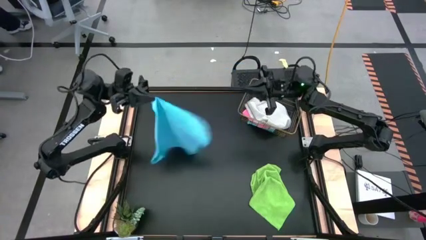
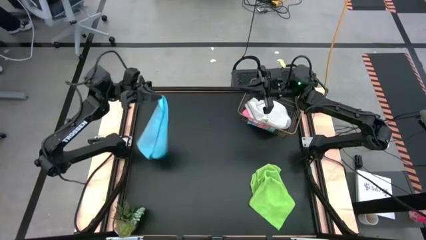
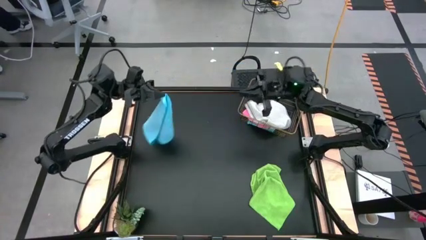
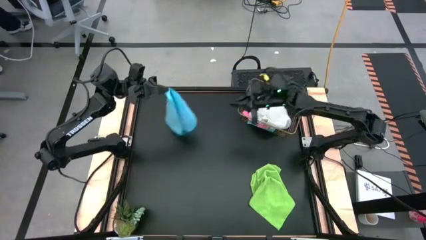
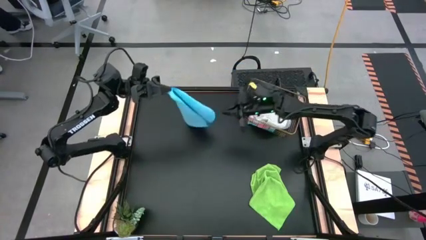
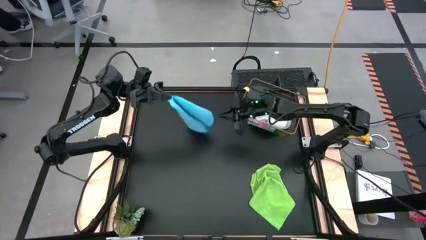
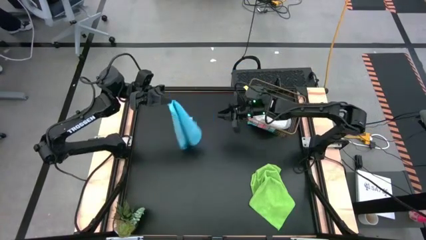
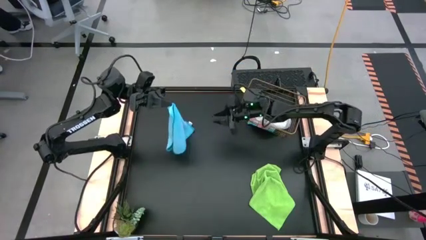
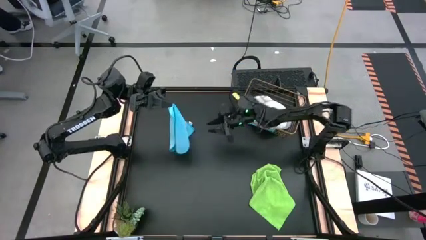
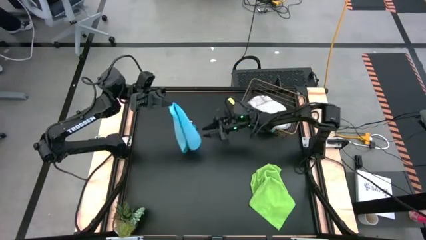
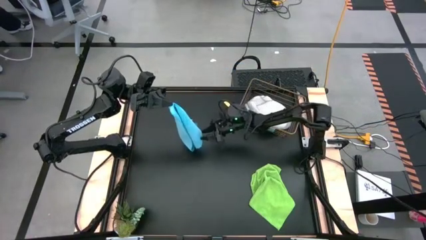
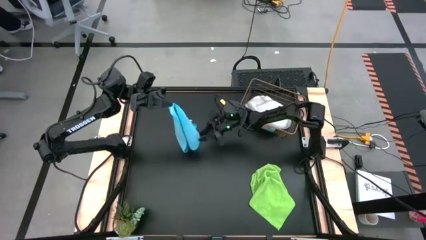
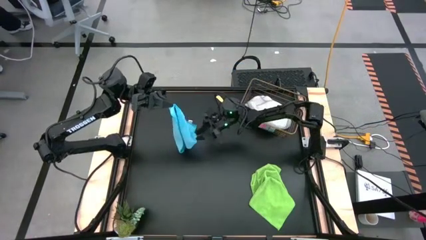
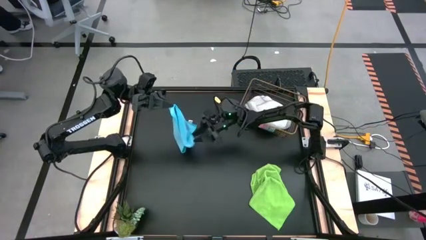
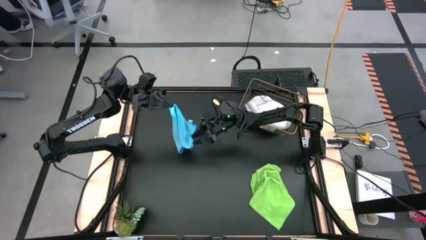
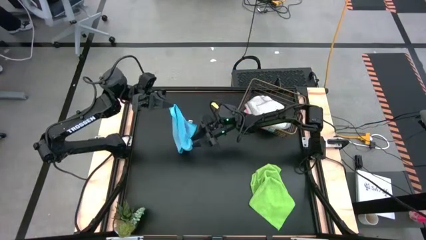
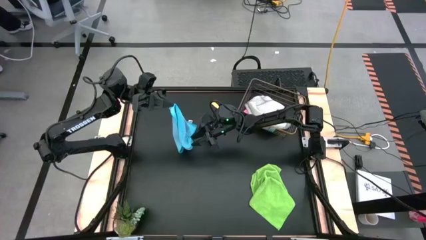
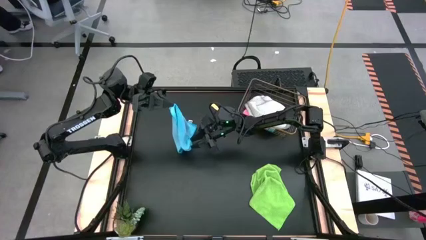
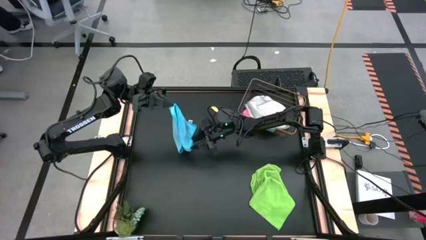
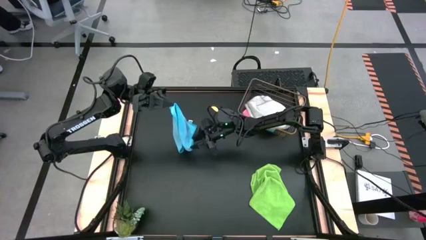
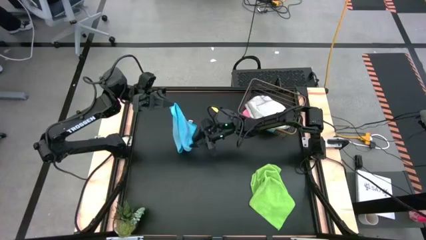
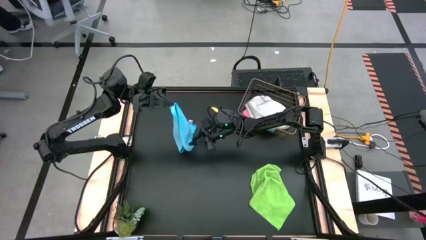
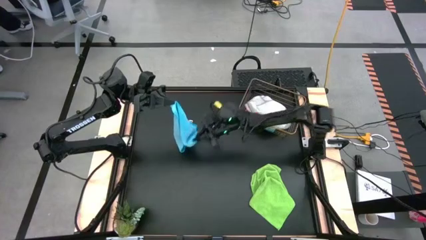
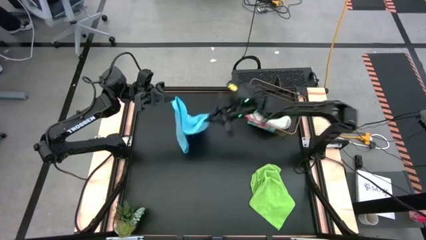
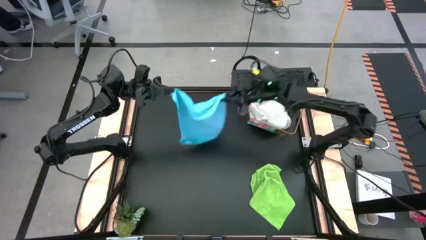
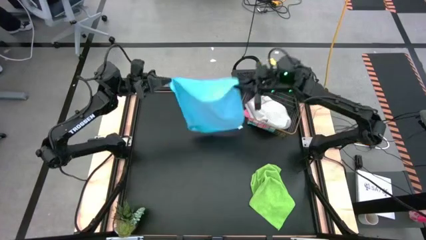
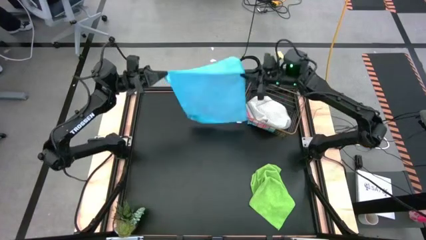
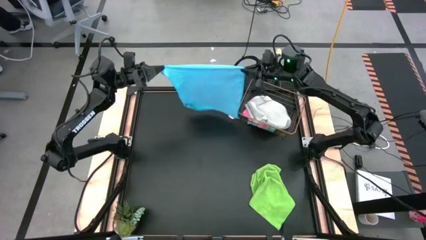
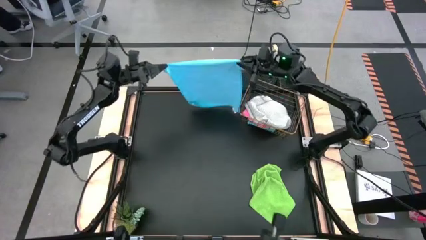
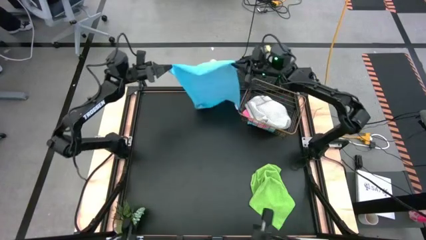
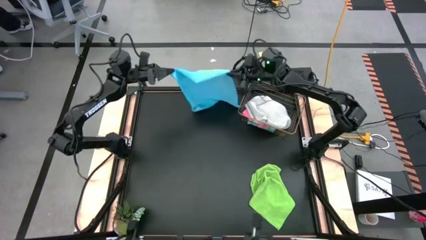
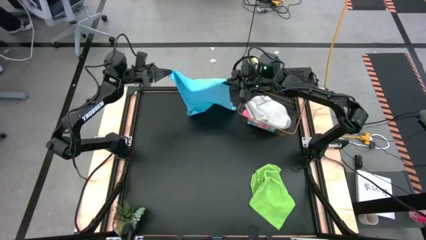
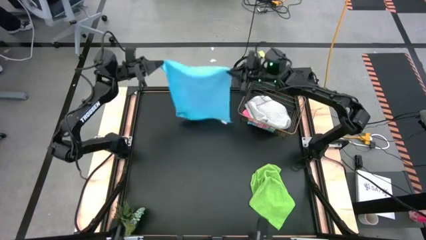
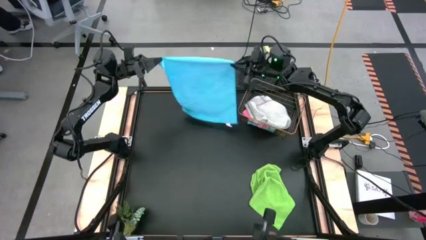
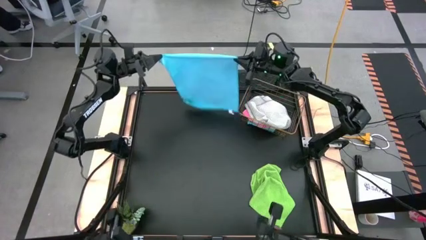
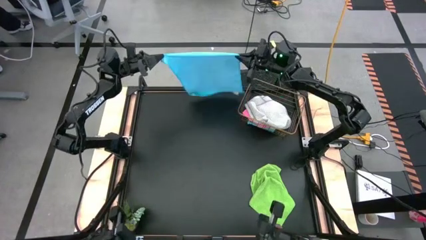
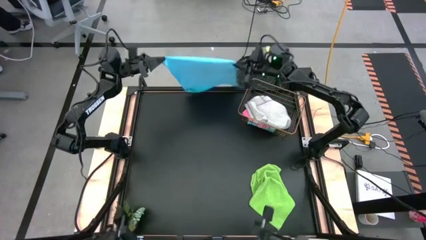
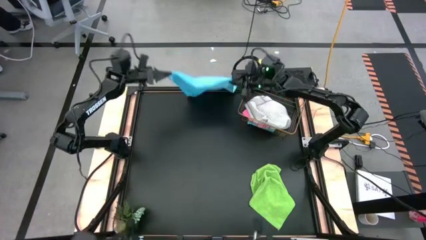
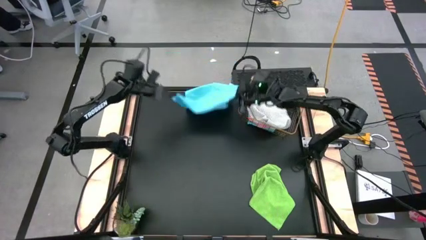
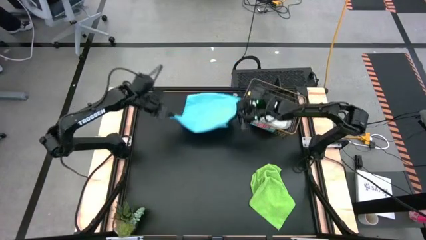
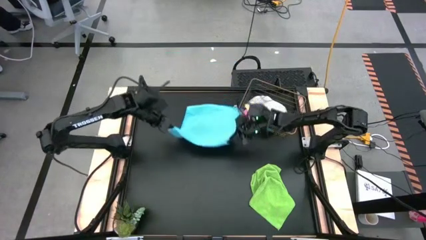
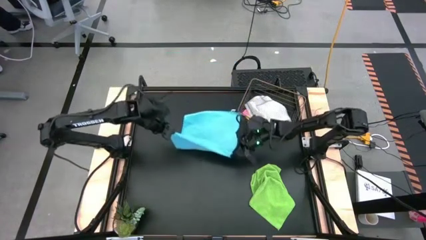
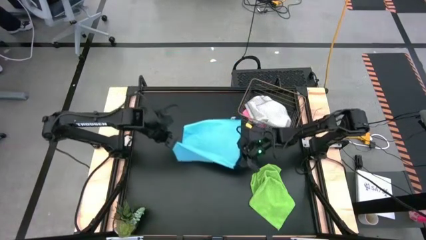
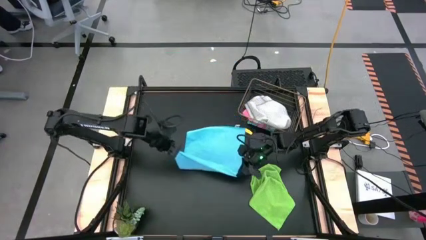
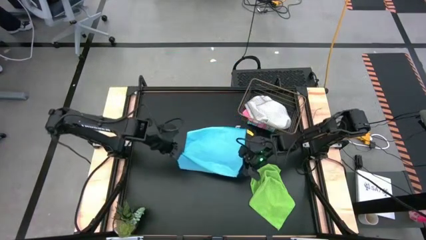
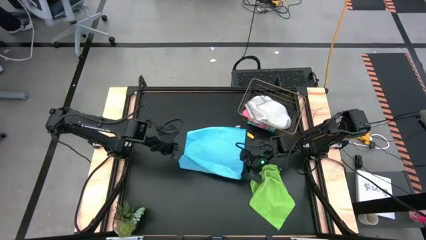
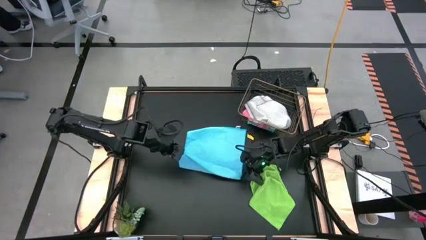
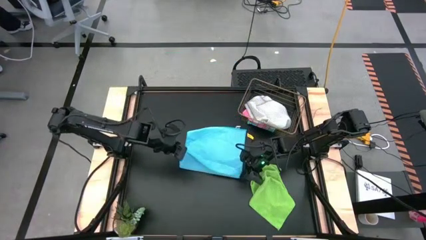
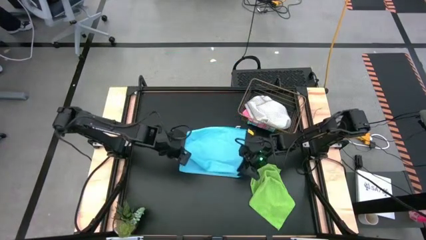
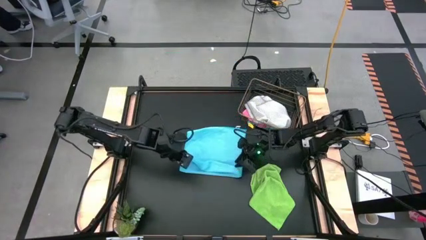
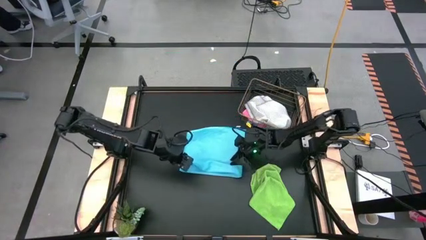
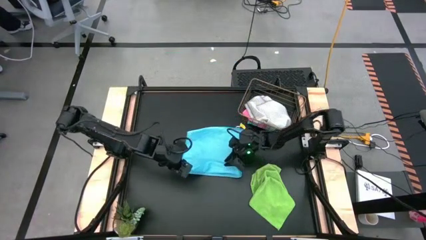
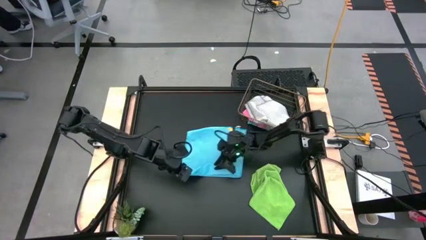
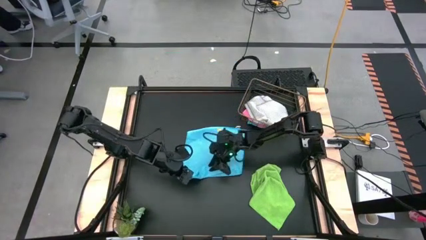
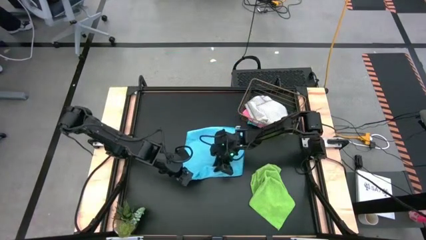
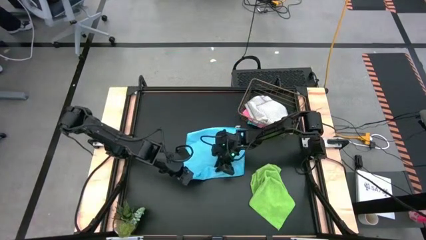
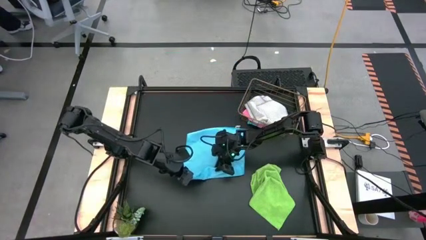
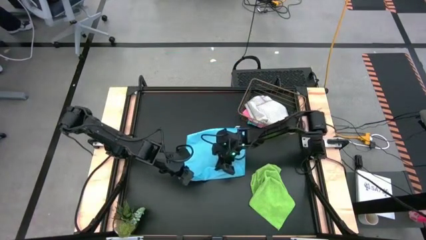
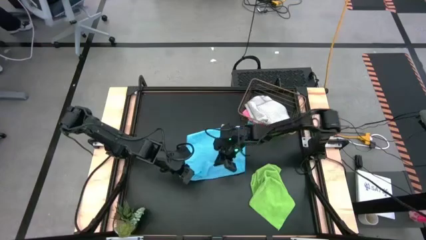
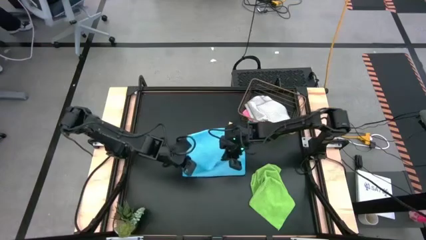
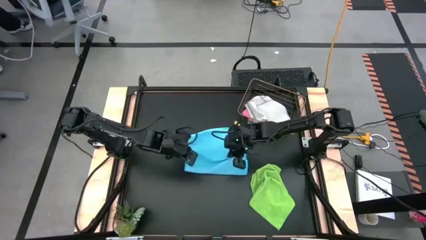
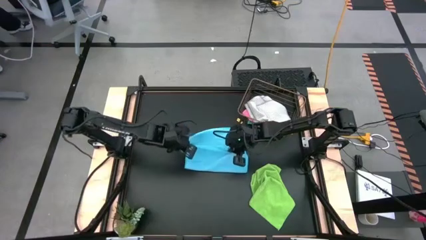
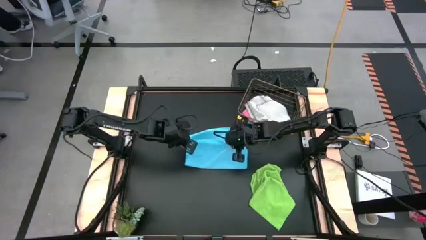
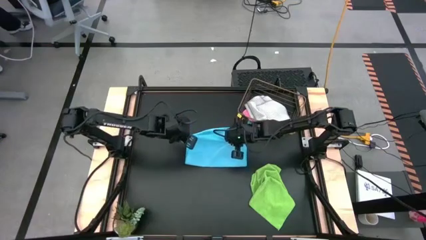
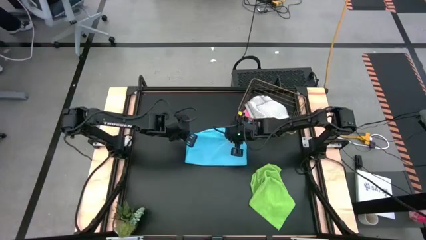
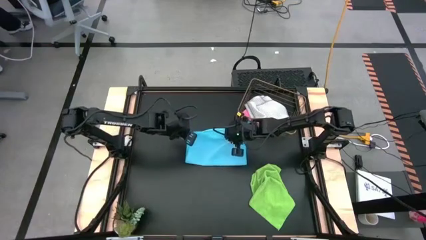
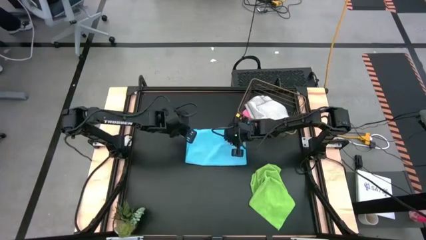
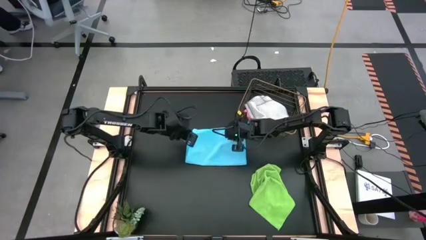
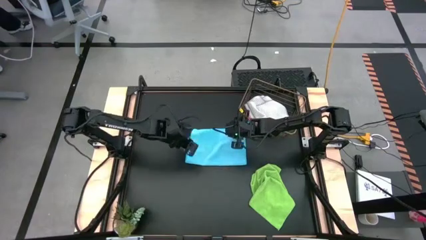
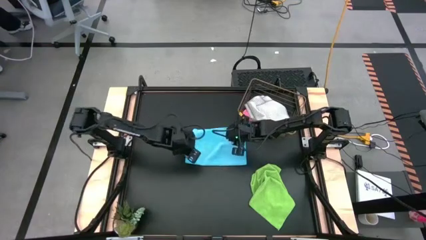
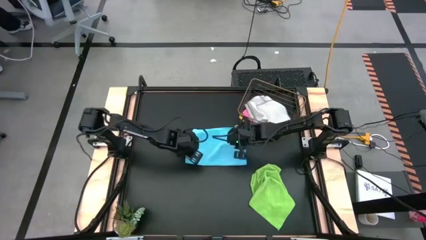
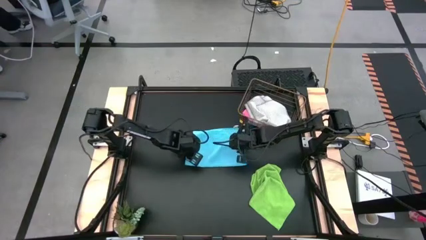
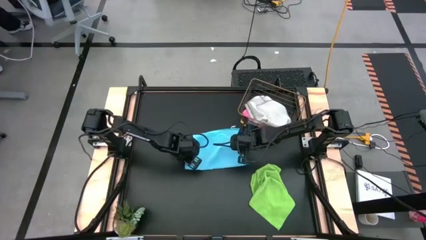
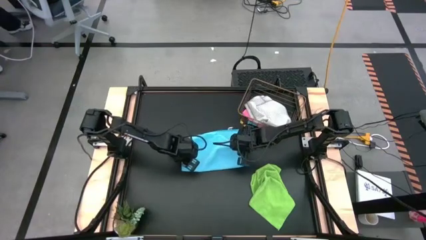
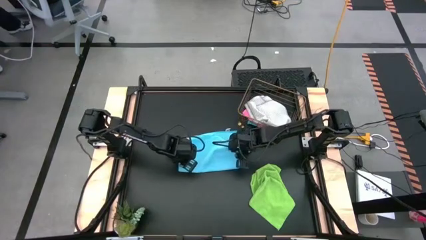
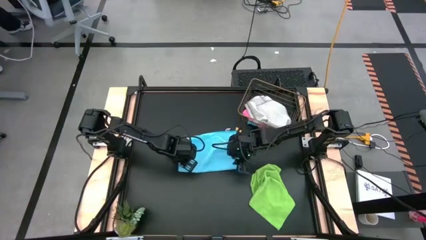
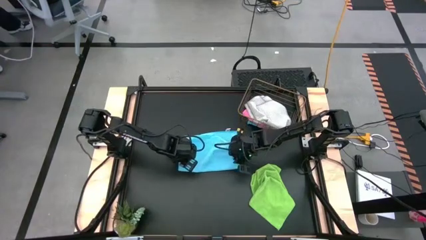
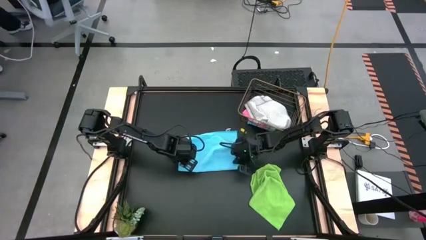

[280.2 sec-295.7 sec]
Task: Fold microfiber towels
Fold the blue towel

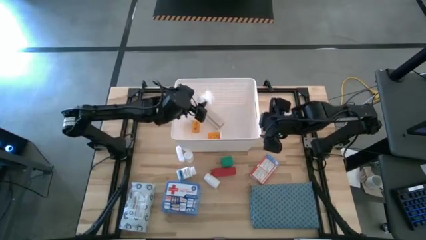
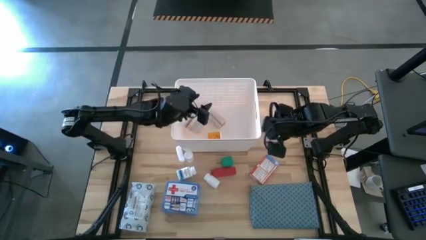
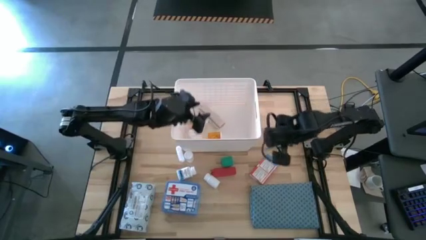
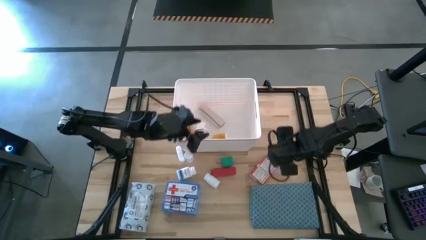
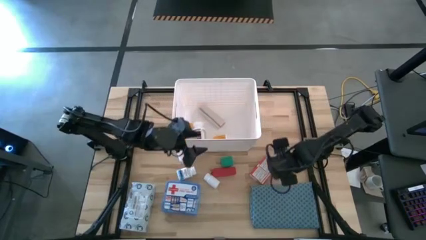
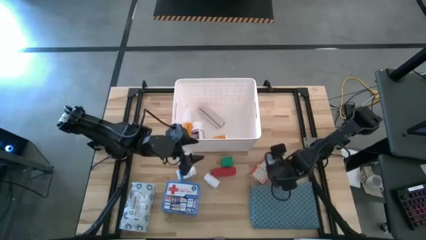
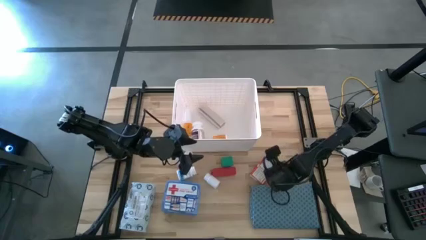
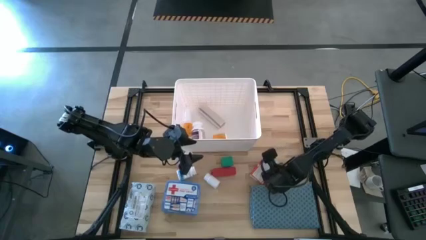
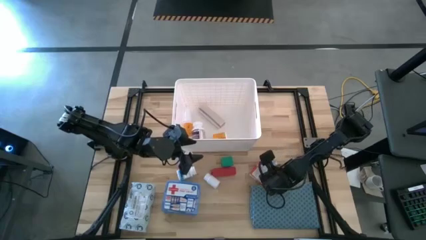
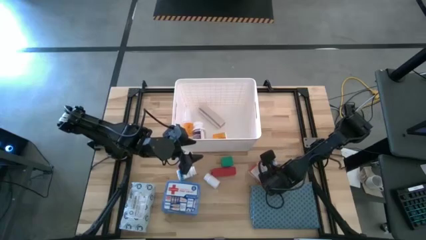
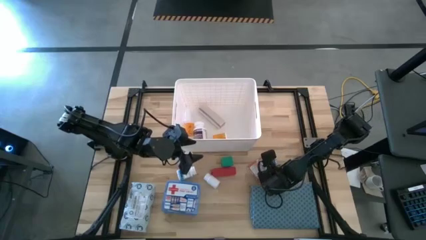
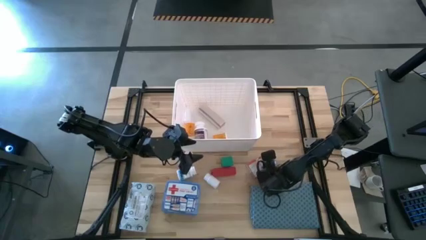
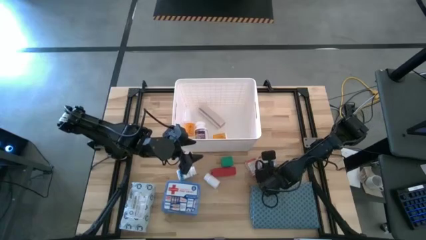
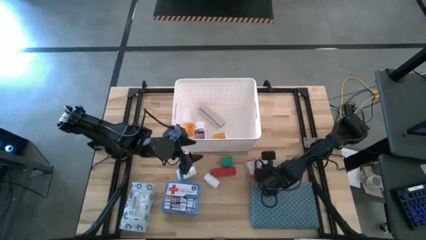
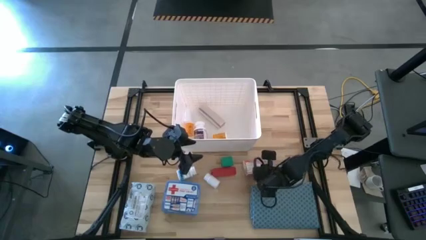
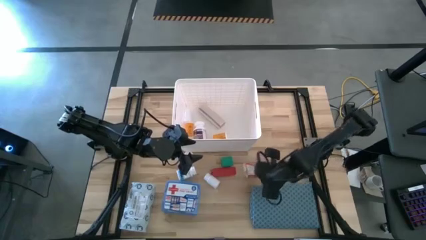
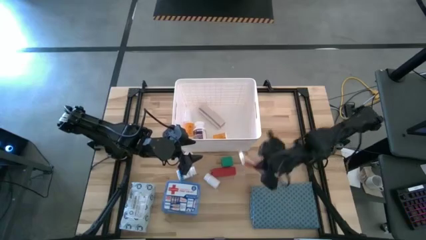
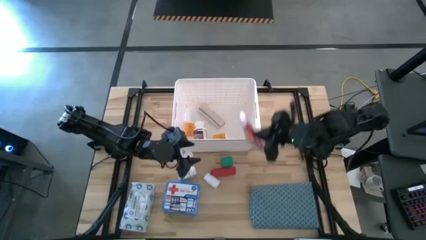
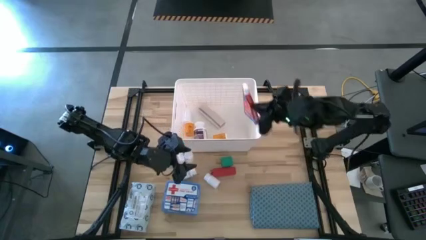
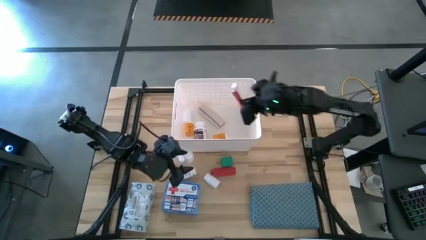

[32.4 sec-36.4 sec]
Task: Pick & place medical supplies in basket/bin
Put the red medicine box into the white bin
